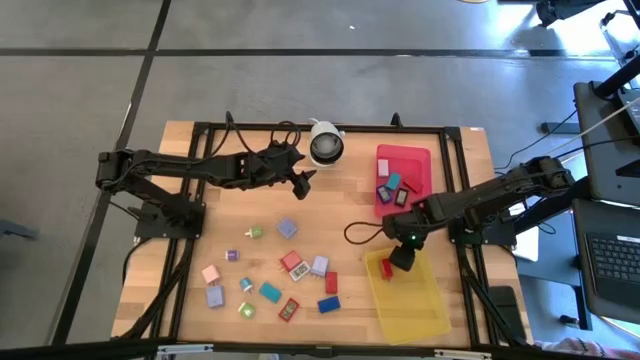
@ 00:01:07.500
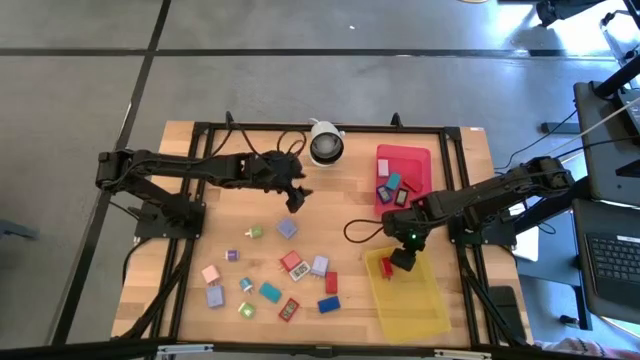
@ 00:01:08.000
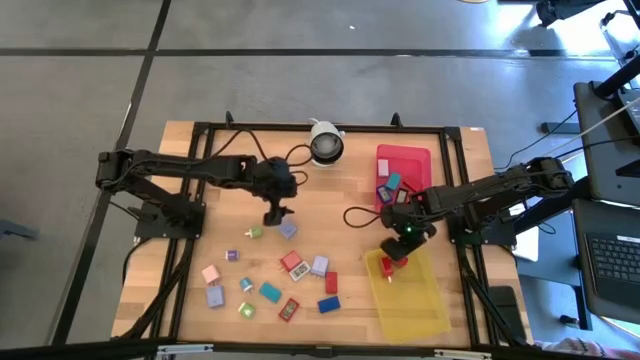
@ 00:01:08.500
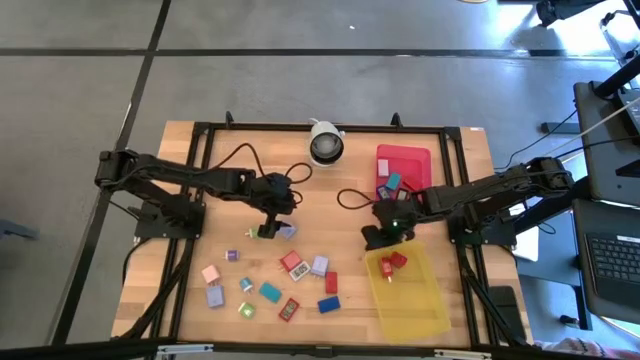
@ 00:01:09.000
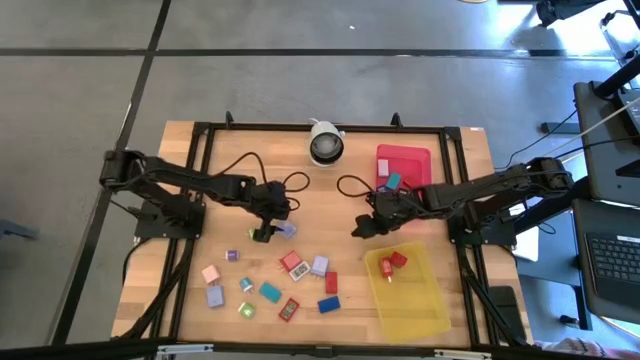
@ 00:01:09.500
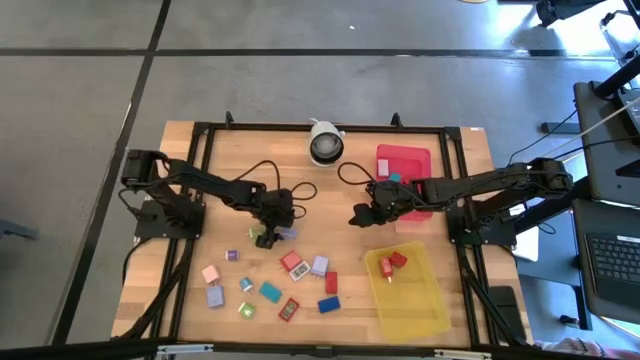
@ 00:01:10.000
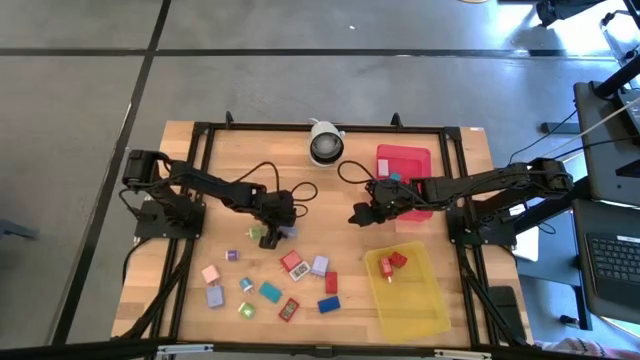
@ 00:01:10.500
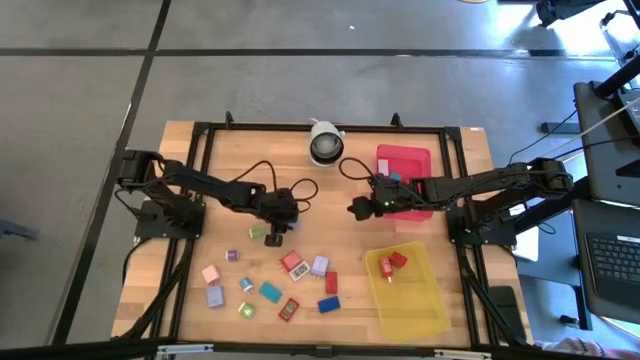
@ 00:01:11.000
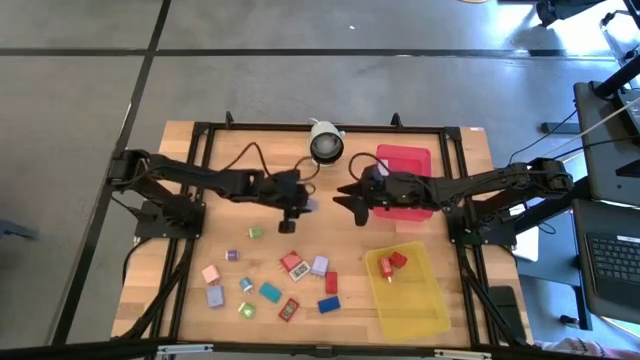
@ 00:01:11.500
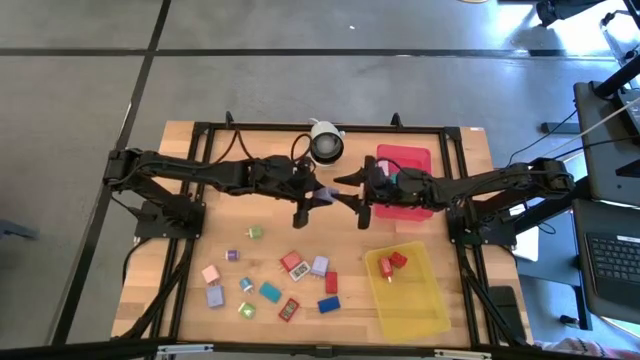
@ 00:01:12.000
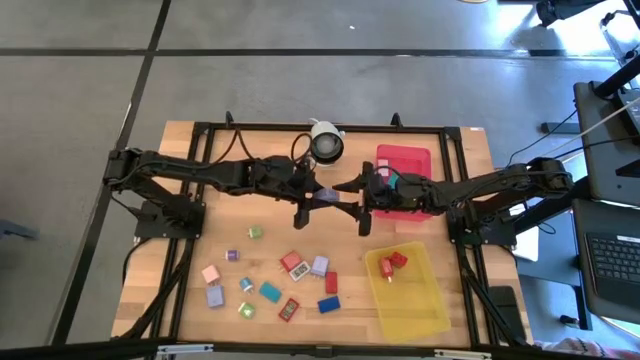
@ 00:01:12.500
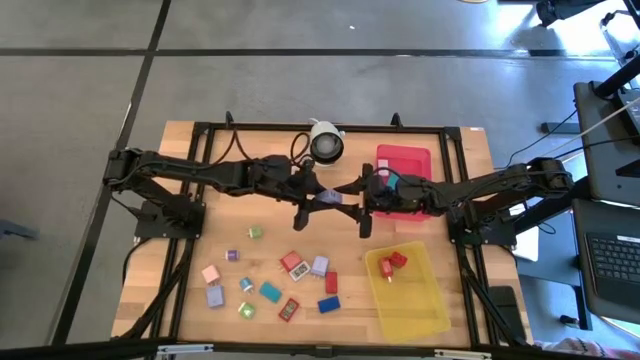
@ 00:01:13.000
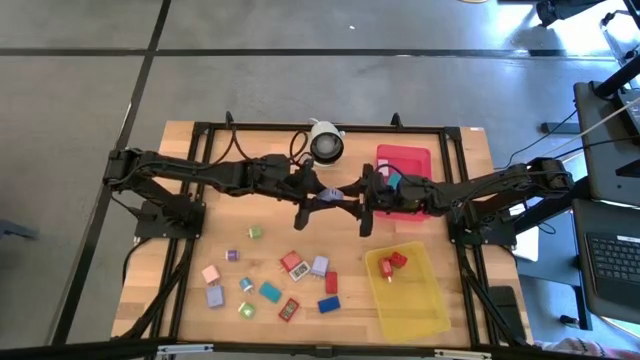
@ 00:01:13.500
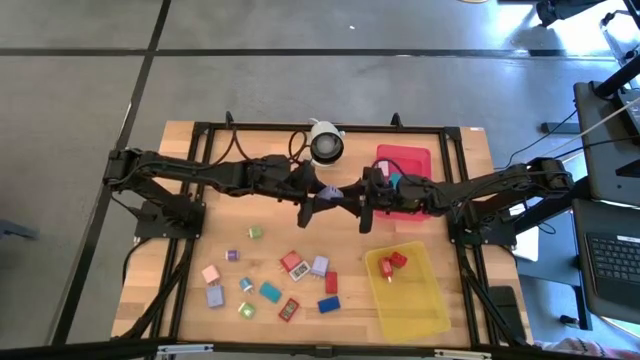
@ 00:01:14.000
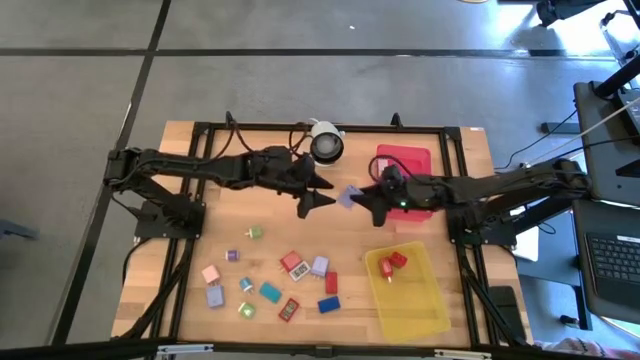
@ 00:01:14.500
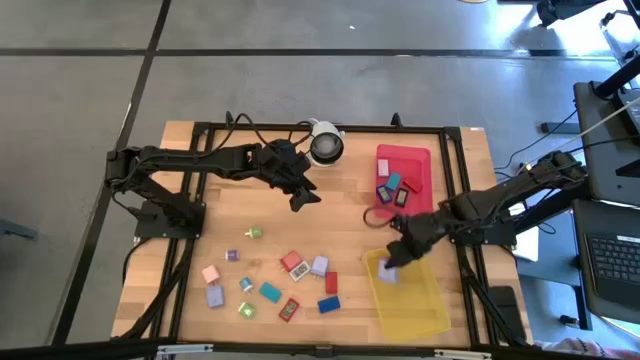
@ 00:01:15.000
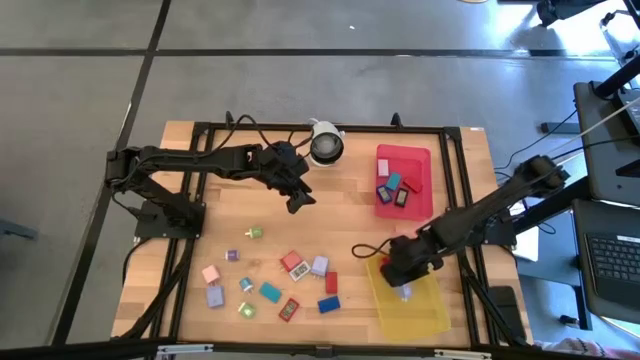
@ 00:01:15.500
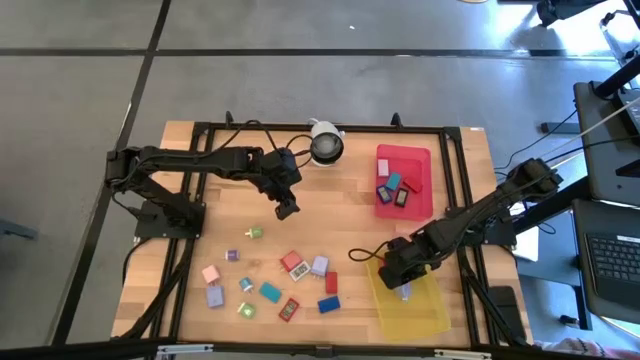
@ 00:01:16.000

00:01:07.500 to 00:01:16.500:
Task: Pick & Place Office items
Put the top purple charger adapter into the yellow bin

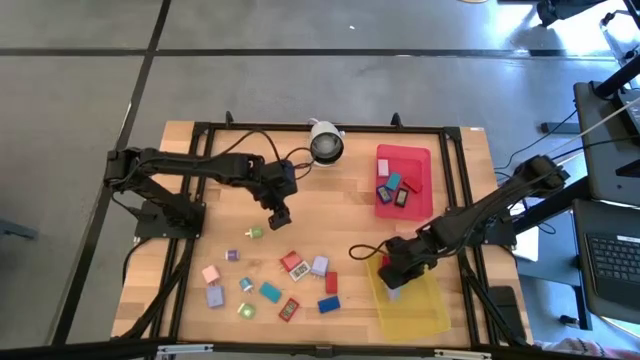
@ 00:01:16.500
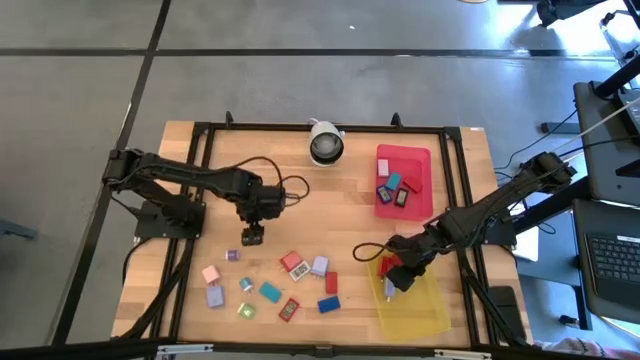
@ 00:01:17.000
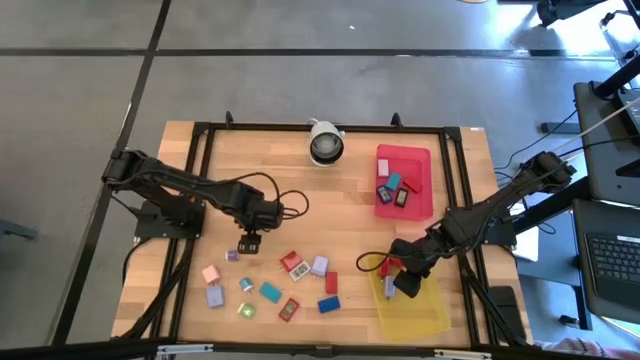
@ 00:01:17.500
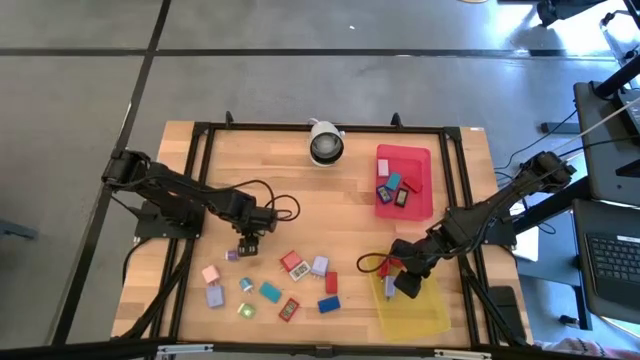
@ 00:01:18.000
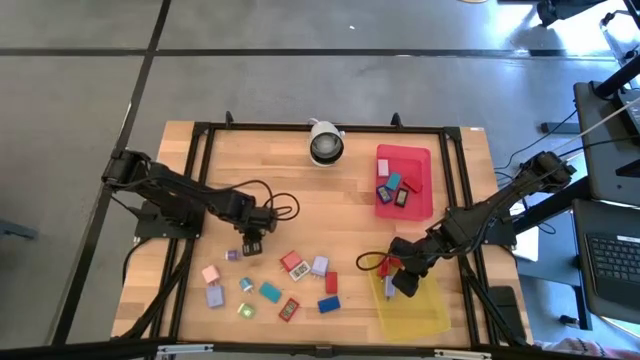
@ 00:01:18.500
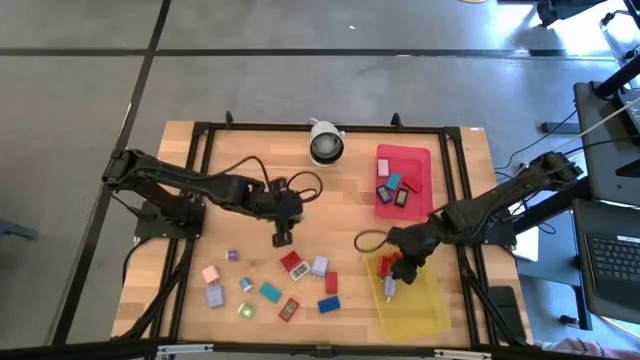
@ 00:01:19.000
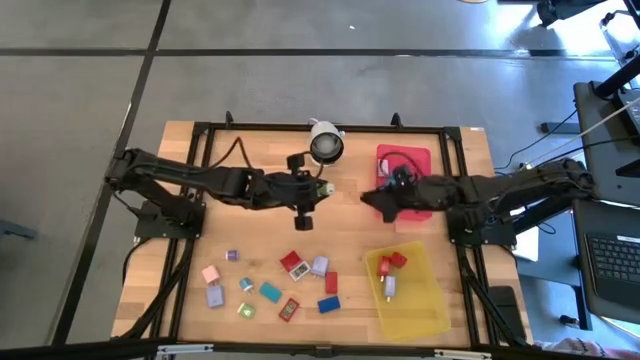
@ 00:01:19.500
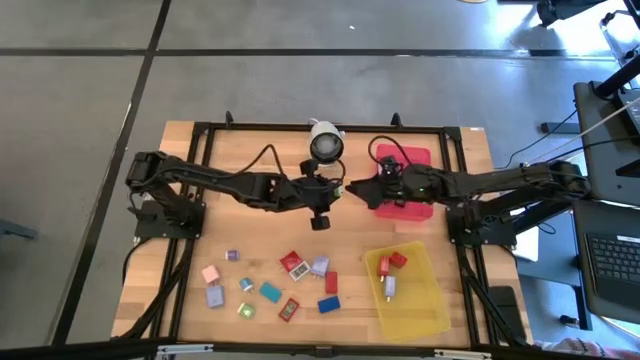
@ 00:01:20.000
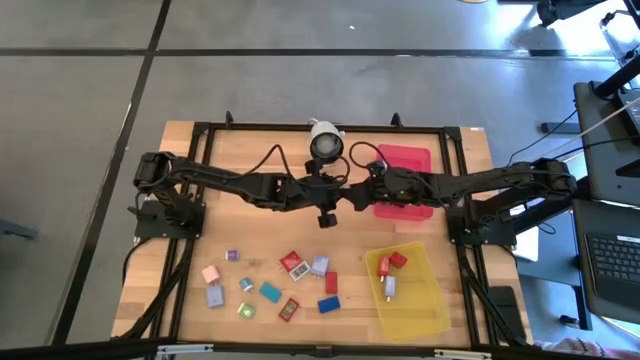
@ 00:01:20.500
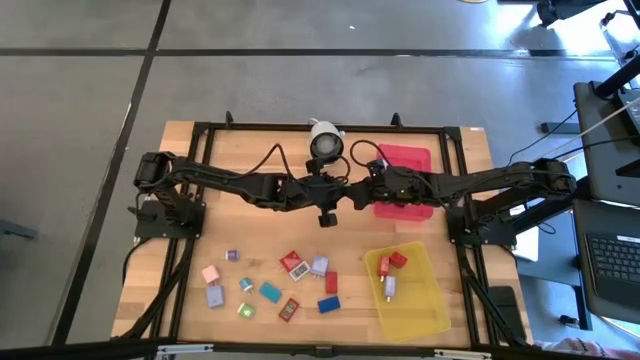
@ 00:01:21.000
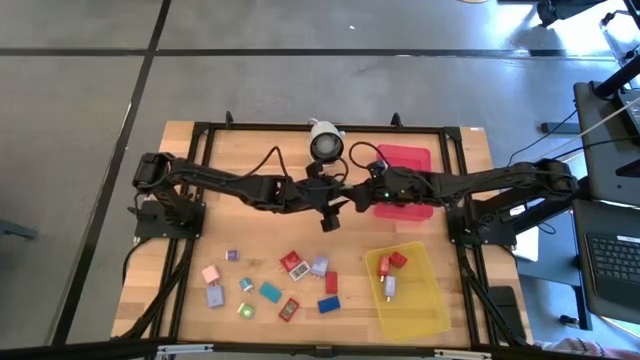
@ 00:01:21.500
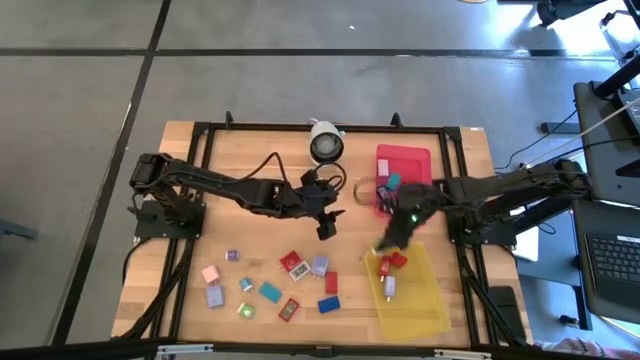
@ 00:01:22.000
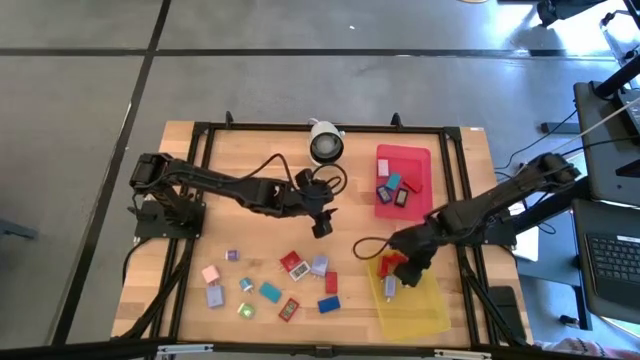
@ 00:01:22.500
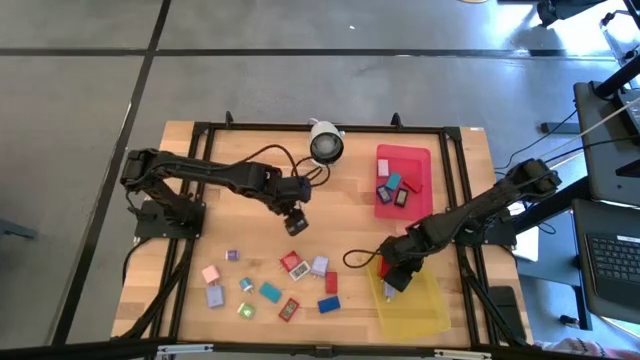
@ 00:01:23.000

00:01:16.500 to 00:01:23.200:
Put the top green charger adapter into the yellow bin

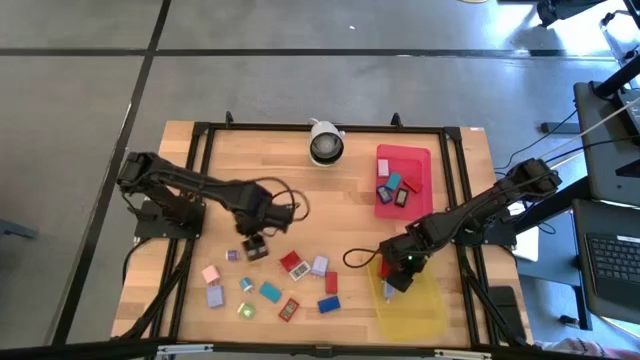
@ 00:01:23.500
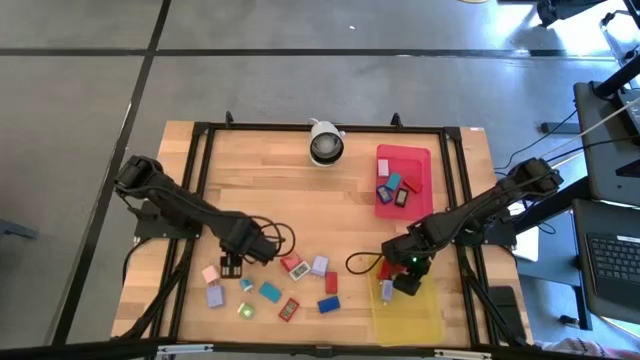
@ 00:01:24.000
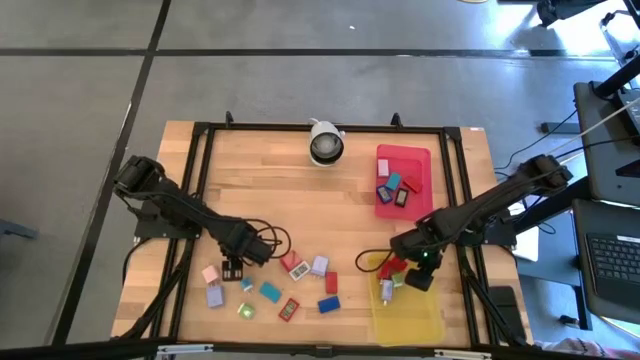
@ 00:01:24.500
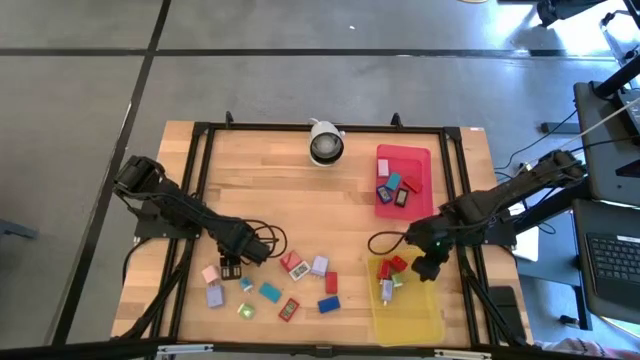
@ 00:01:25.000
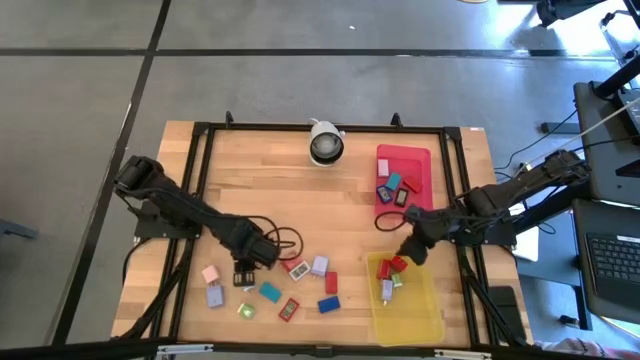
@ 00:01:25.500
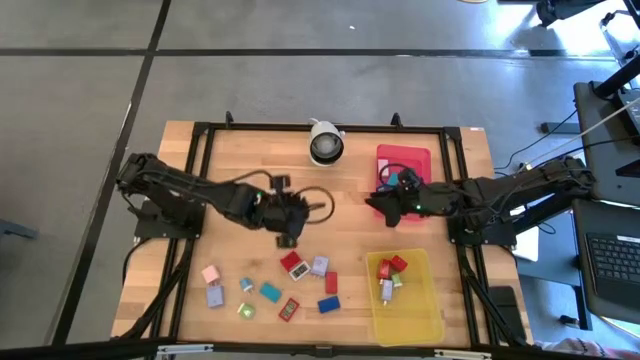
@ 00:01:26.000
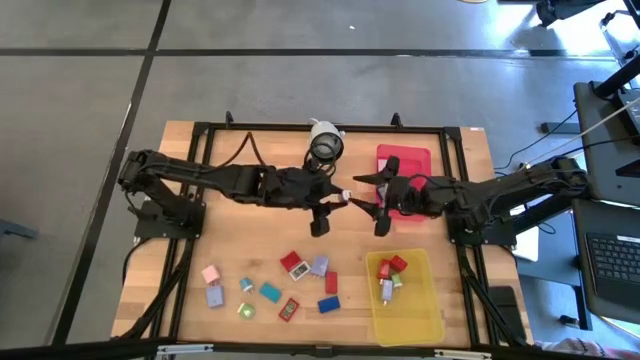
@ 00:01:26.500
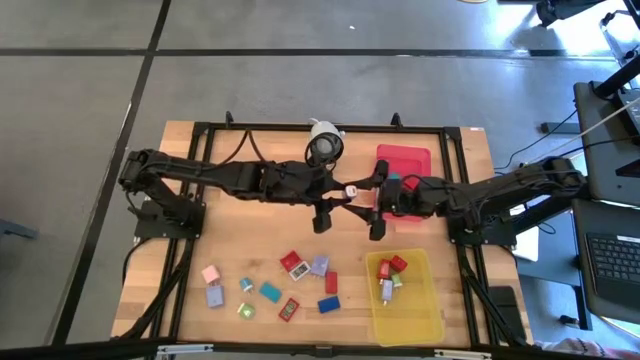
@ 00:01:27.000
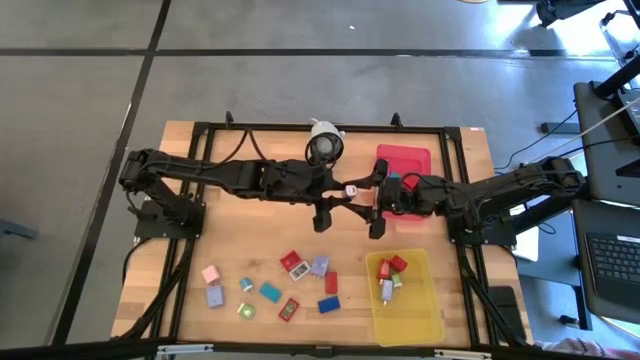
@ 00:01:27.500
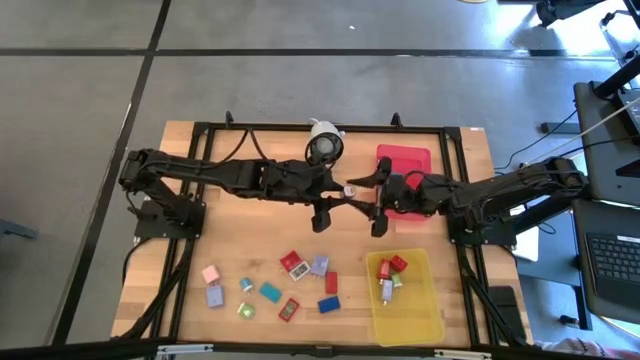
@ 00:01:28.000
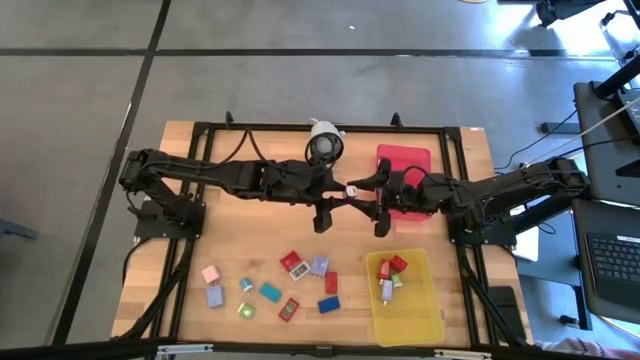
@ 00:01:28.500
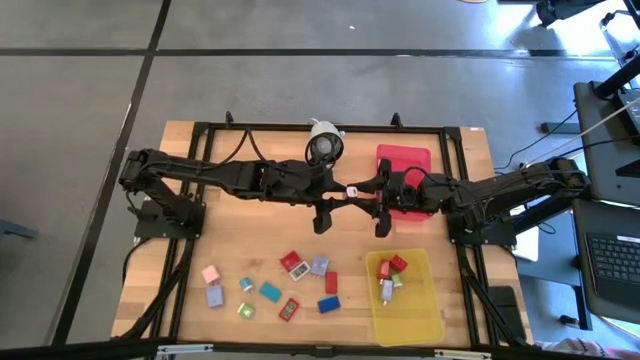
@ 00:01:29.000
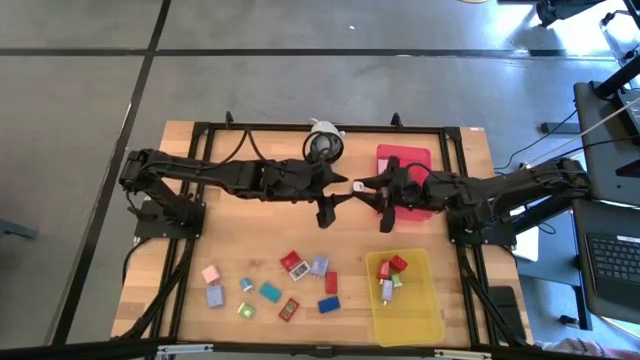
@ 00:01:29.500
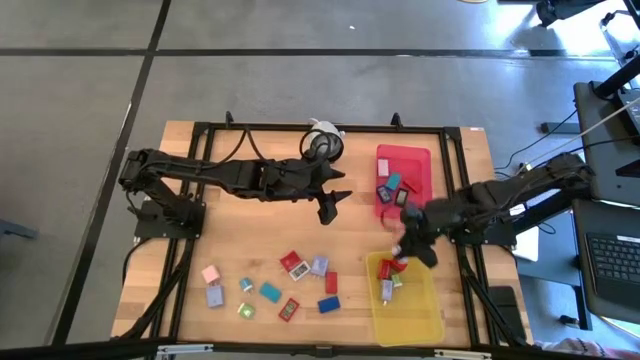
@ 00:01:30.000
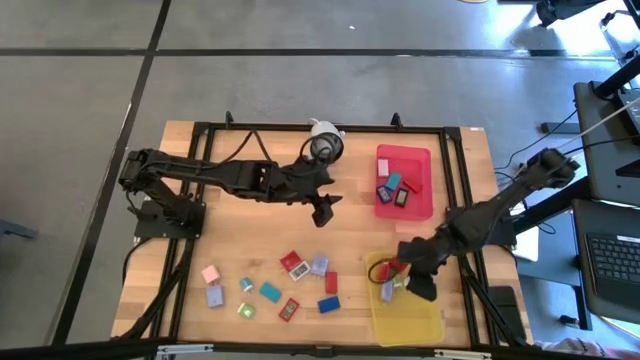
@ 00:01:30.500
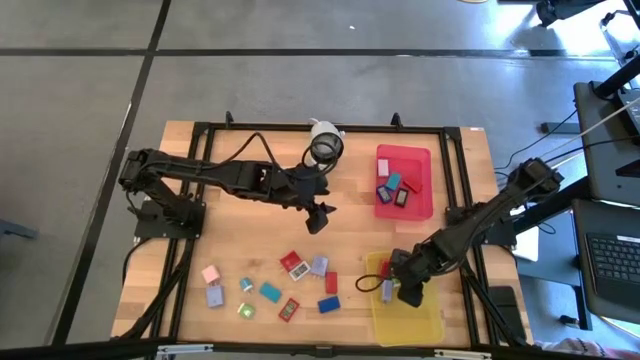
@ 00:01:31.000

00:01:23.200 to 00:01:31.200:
Put the violet charger adapter into the yellow bin
